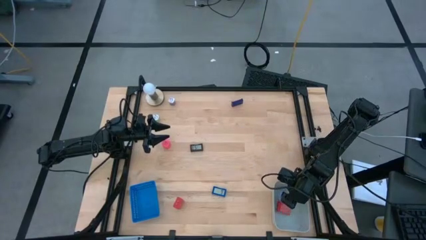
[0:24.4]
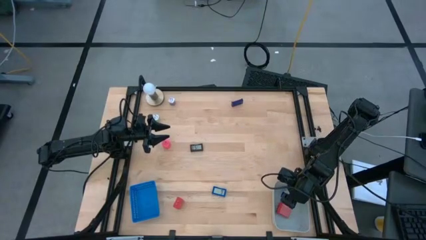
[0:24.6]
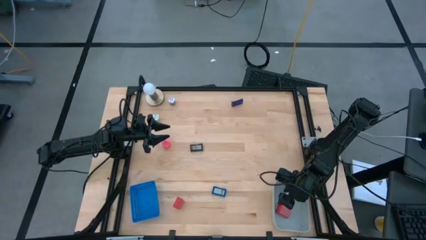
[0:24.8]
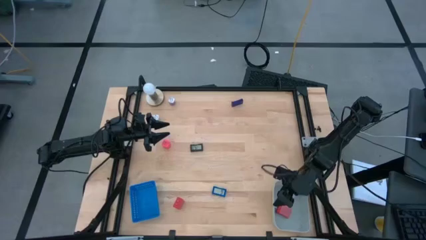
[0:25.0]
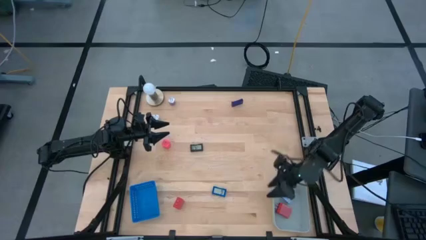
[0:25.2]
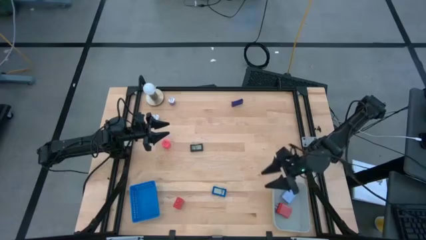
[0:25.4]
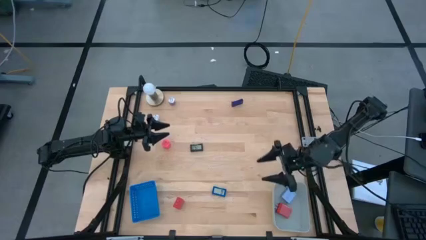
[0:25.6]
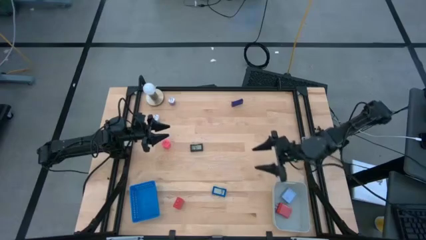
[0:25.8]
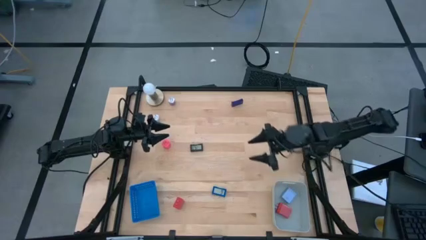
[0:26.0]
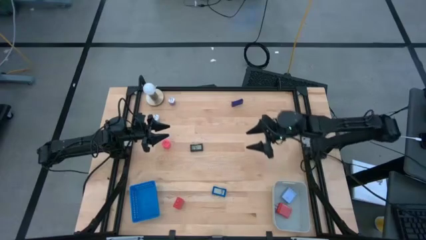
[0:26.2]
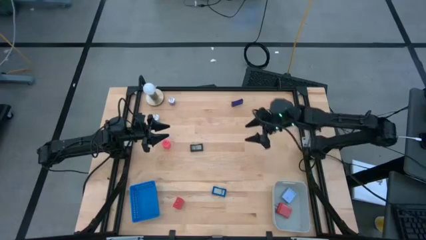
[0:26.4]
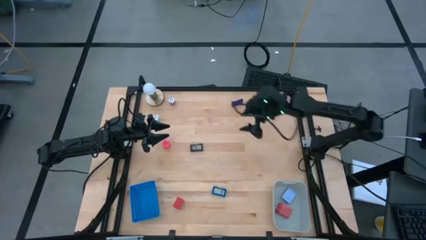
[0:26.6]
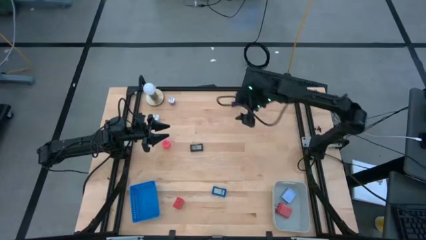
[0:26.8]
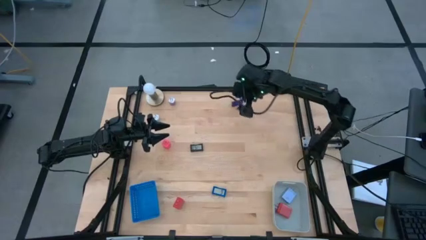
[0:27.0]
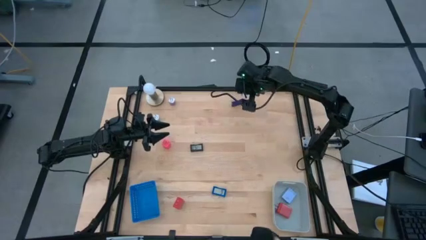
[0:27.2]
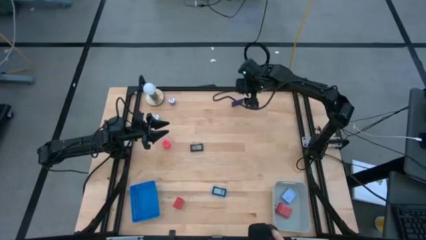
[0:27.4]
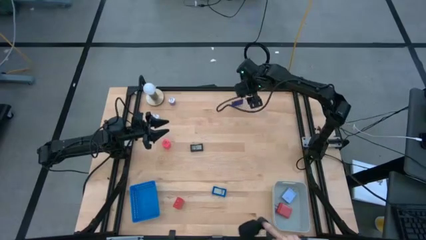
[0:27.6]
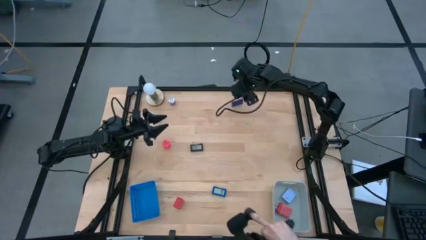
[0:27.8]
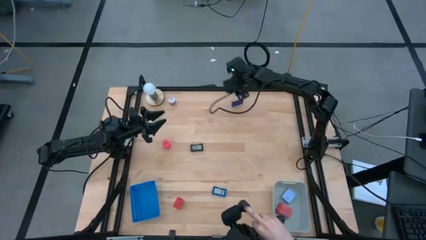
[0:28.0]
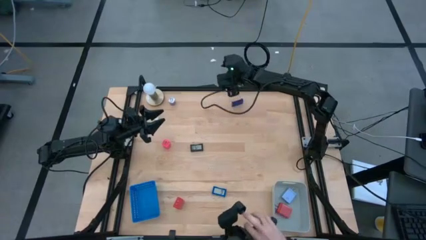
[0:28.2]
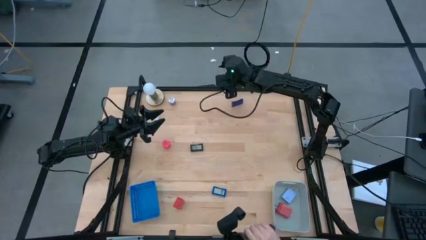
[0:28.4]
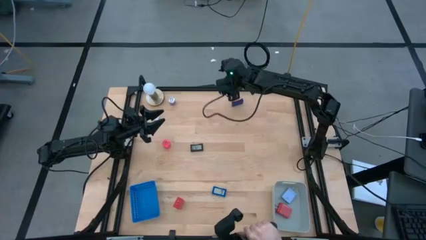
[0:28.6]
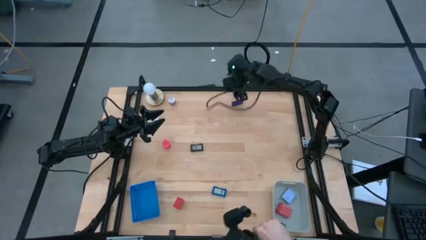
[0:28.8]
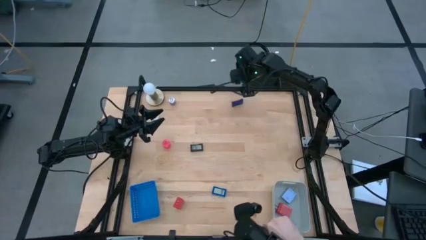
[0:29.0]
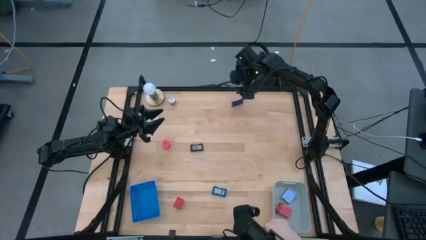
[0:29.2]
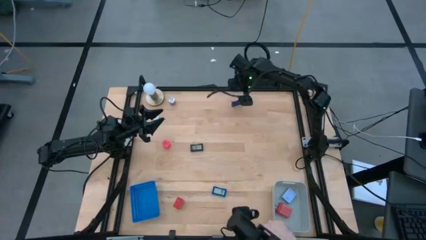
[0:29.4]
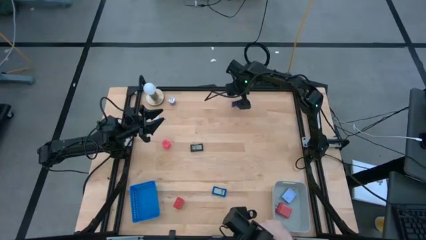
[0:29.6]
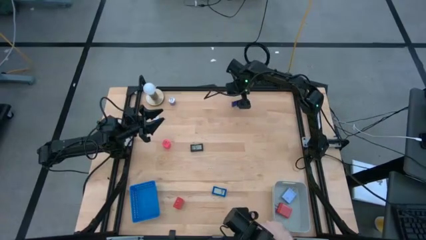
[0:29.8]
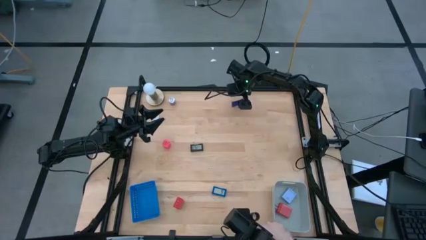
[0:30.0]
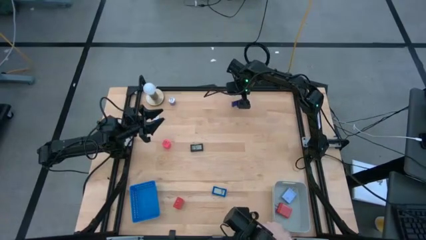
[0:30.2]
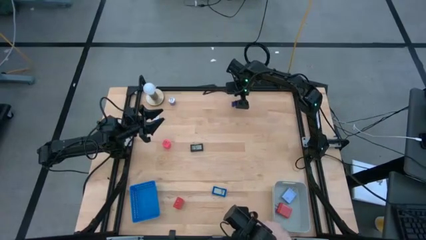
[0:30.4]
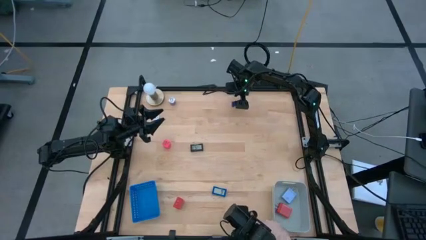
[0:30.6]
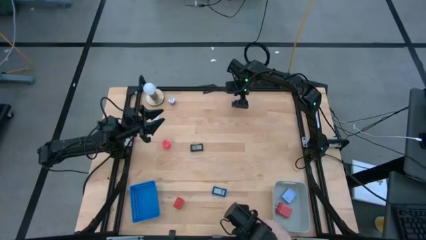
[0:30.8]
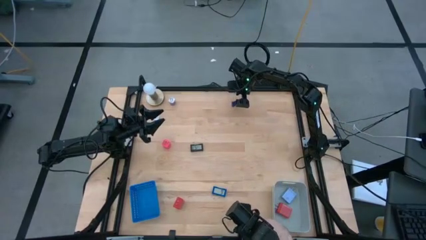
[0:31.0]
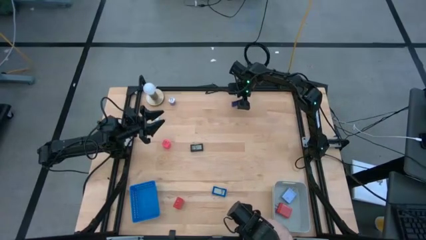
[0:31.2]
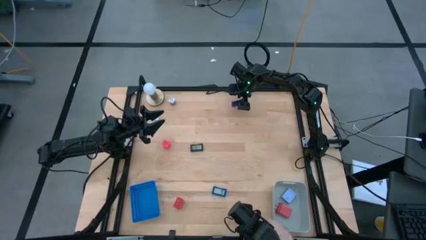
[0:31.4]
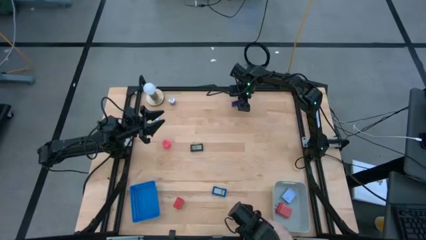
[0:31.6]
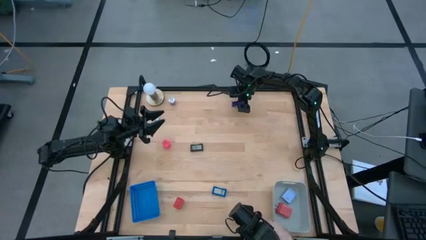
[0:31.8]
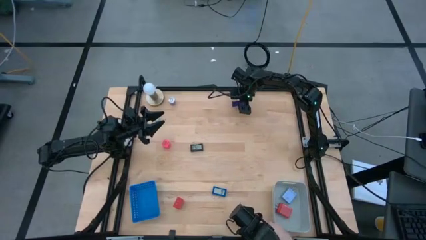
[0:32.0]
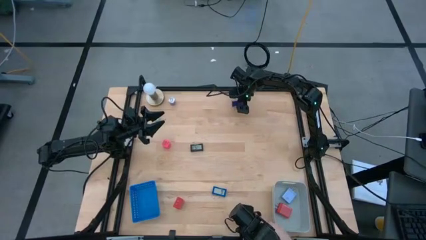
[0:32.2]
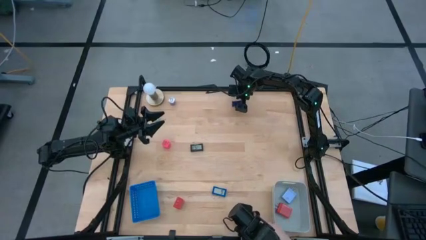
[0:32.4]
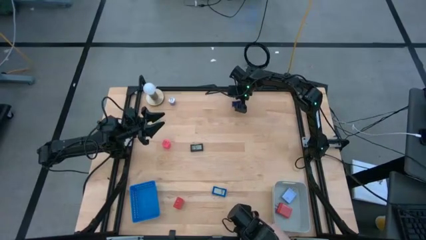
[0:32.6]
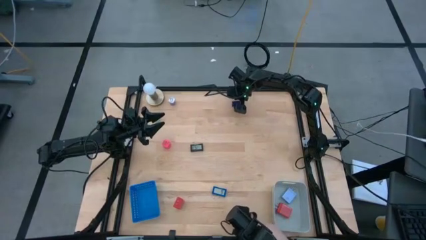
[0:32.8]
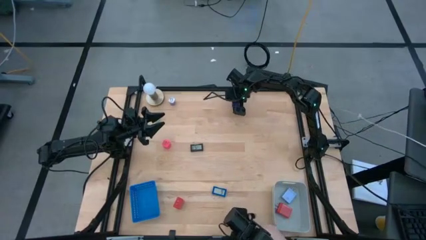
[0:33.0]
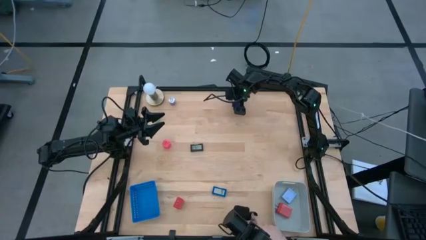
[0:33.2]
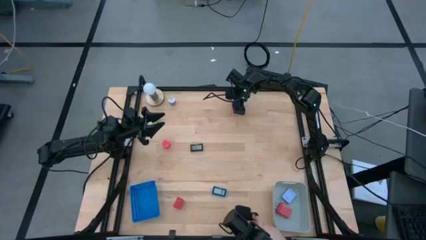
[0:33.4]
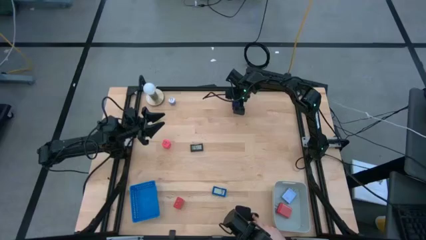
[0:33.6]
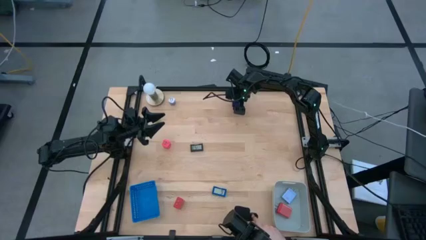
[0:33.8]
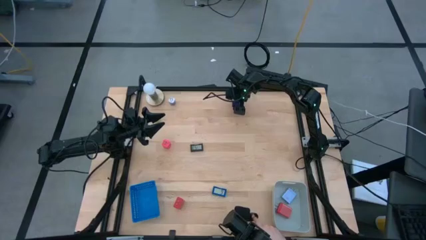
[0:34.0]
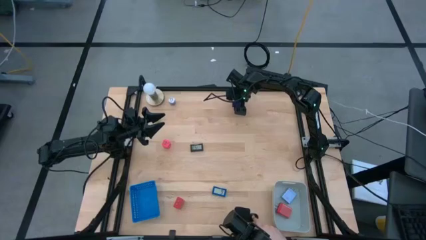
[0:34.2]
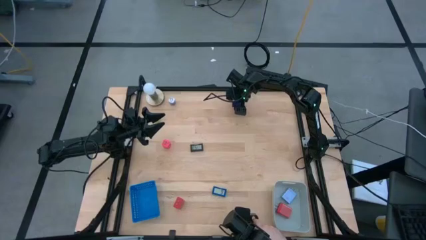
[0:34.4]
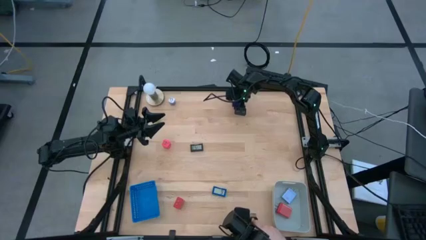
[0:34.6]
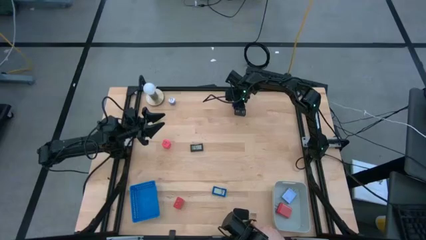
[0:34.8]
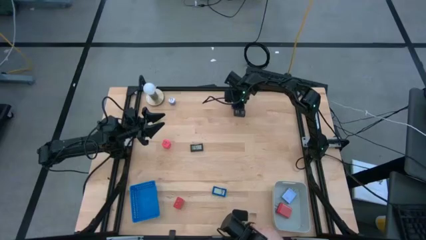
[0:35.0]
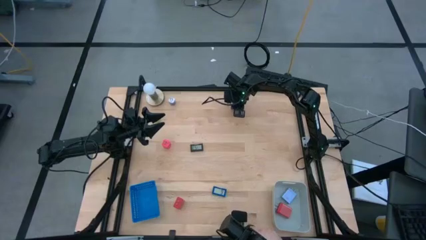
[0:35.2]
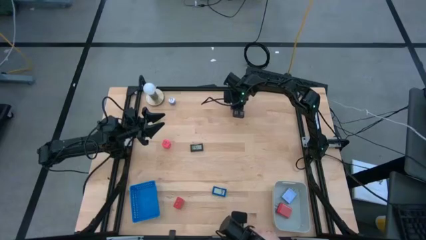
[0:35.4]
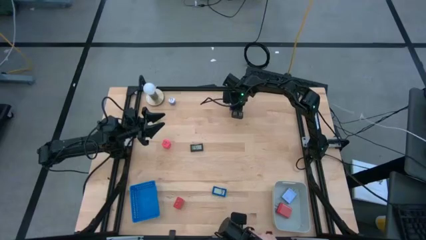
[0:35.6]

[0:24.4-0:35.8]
Task: Pick & Place Office items
Put the purple digital timer into the blue bin
